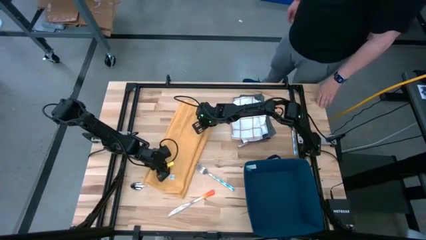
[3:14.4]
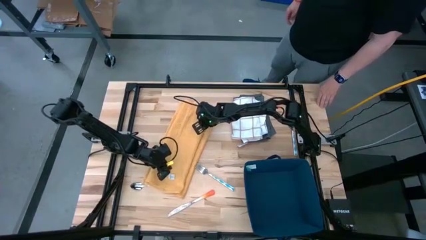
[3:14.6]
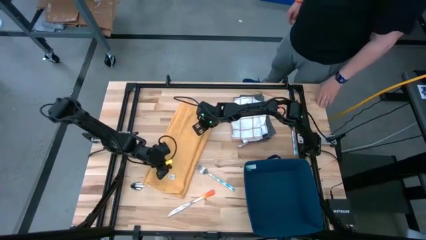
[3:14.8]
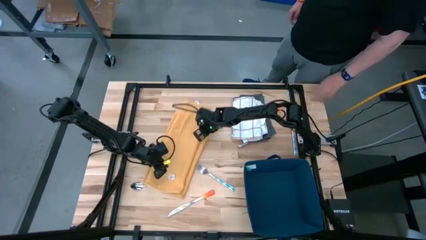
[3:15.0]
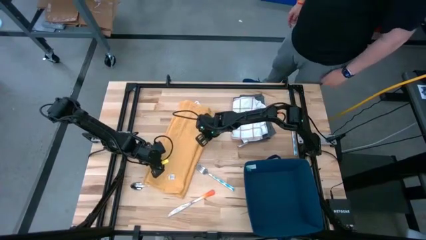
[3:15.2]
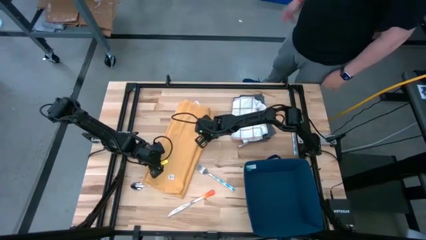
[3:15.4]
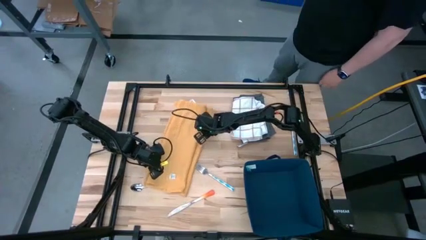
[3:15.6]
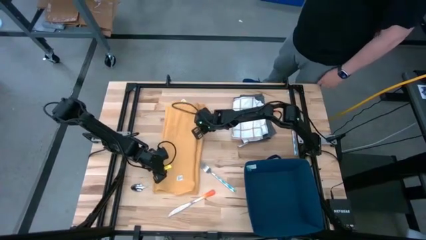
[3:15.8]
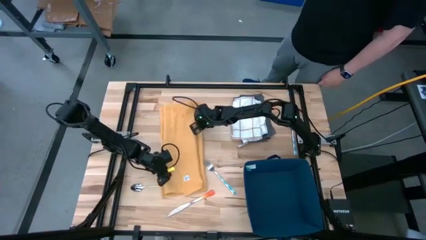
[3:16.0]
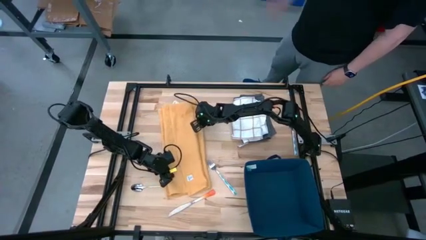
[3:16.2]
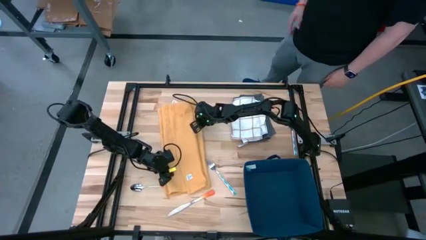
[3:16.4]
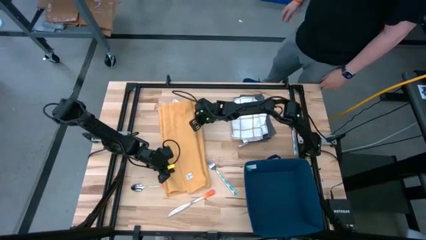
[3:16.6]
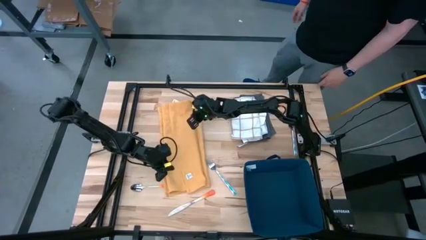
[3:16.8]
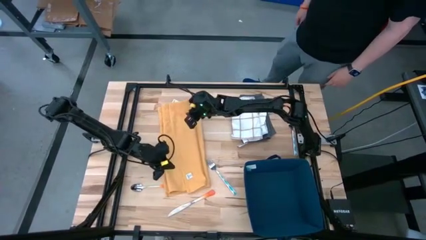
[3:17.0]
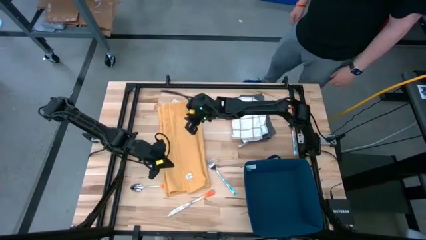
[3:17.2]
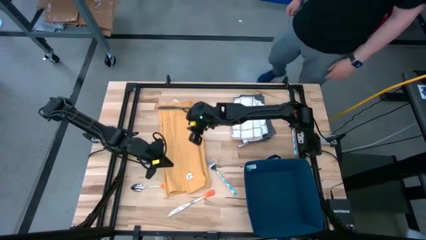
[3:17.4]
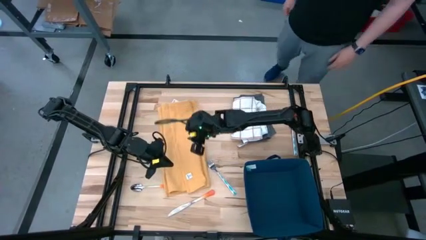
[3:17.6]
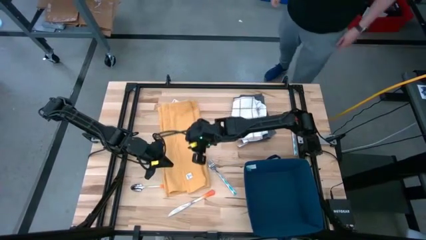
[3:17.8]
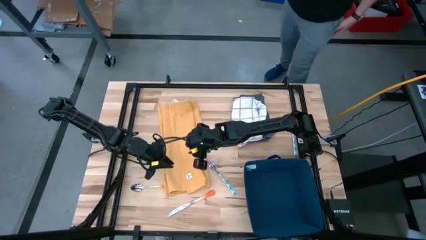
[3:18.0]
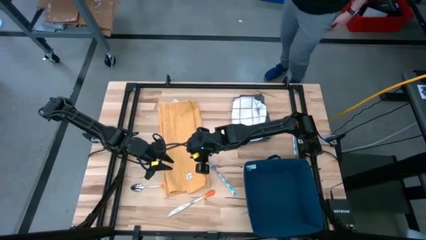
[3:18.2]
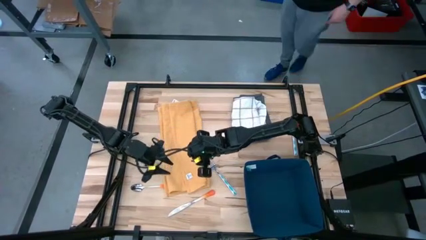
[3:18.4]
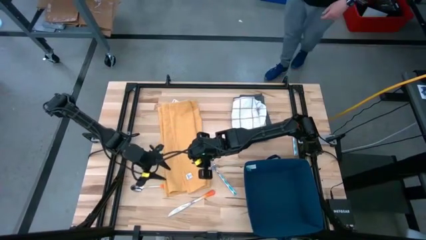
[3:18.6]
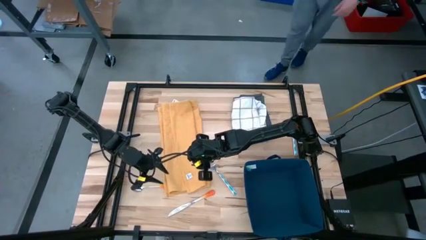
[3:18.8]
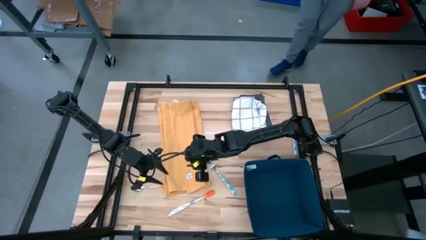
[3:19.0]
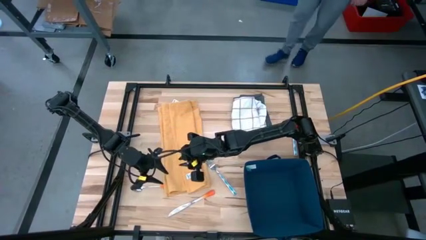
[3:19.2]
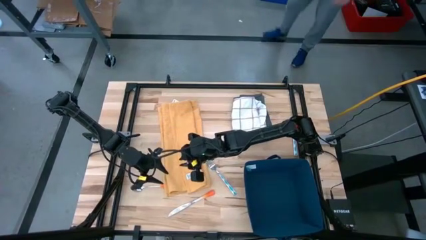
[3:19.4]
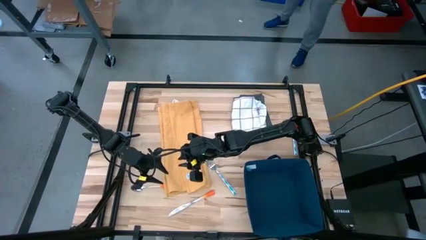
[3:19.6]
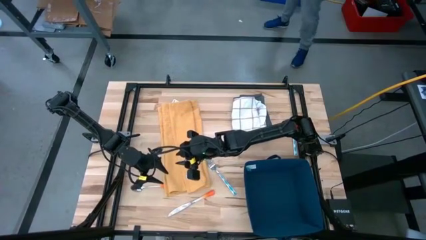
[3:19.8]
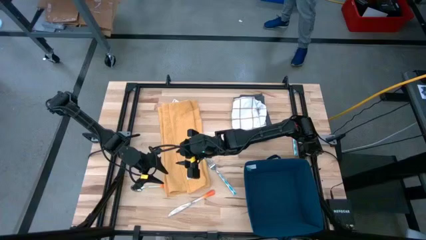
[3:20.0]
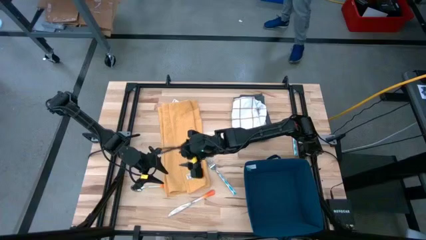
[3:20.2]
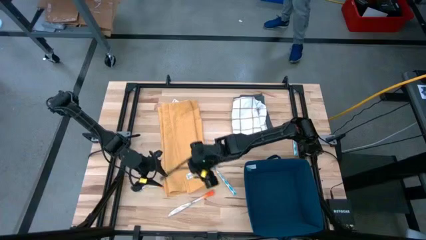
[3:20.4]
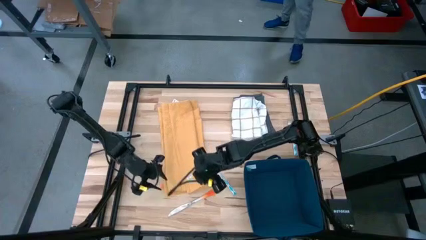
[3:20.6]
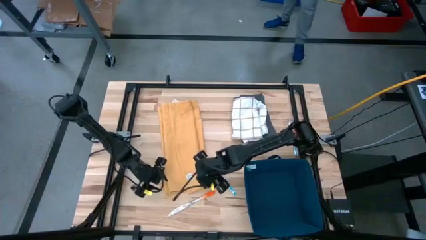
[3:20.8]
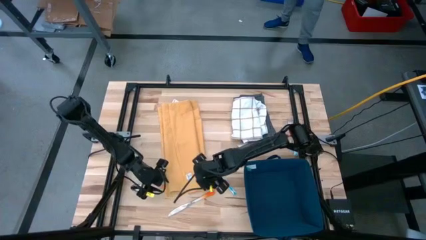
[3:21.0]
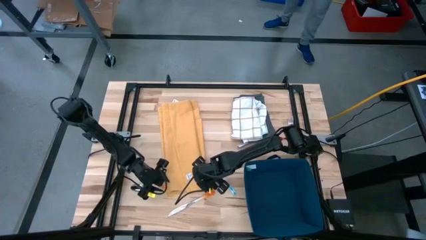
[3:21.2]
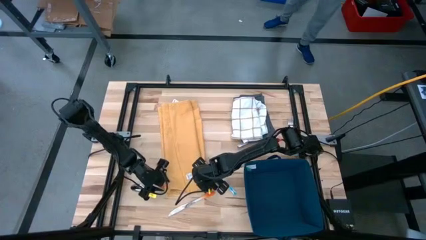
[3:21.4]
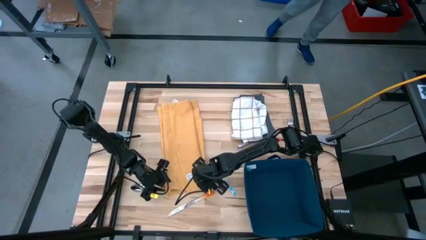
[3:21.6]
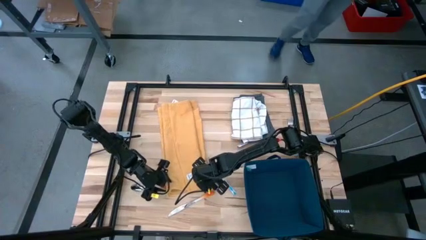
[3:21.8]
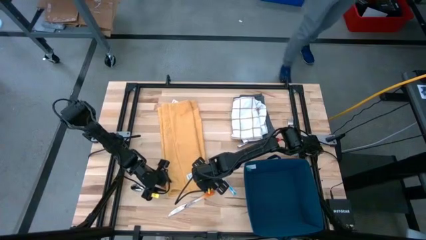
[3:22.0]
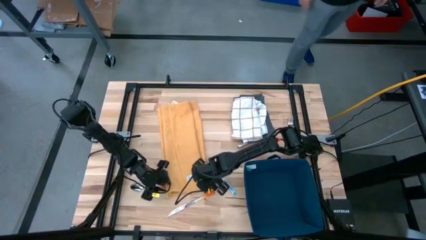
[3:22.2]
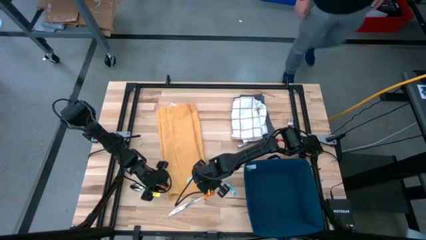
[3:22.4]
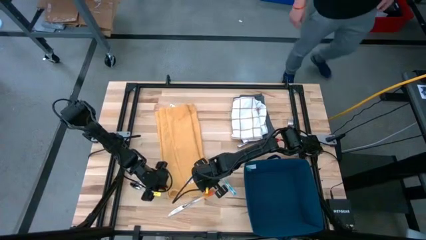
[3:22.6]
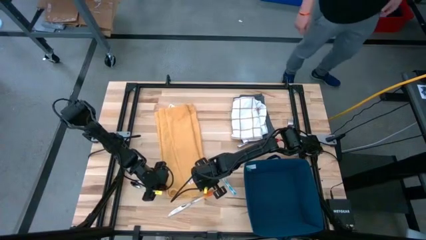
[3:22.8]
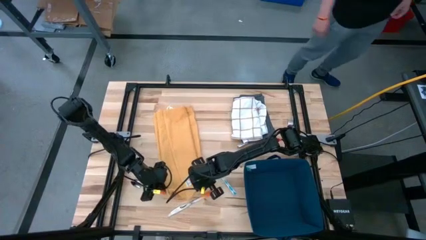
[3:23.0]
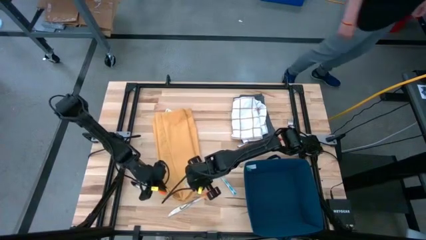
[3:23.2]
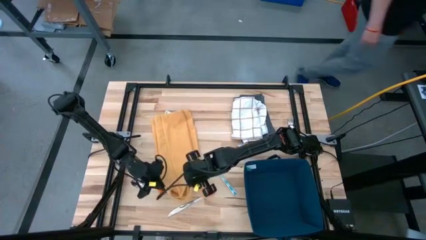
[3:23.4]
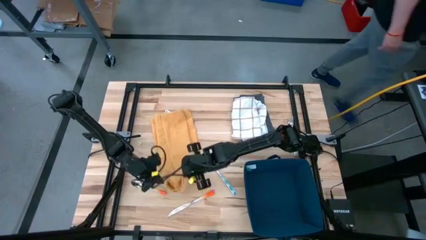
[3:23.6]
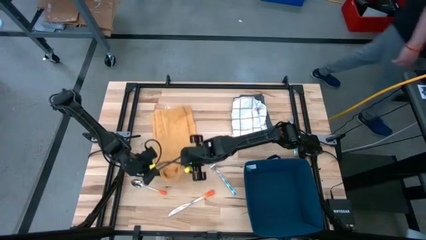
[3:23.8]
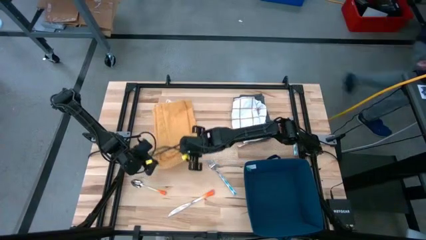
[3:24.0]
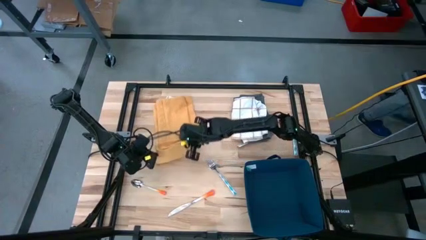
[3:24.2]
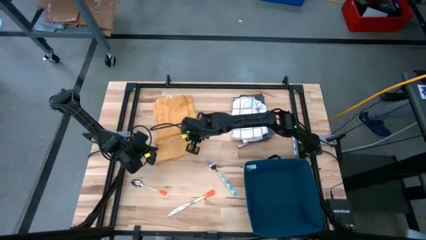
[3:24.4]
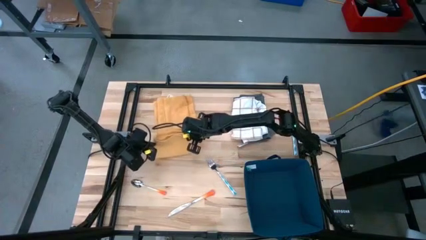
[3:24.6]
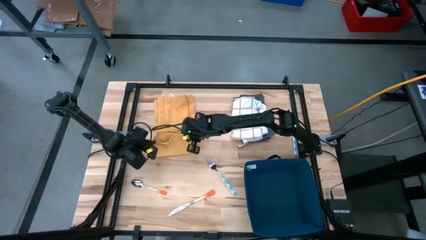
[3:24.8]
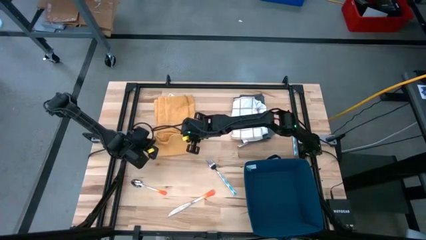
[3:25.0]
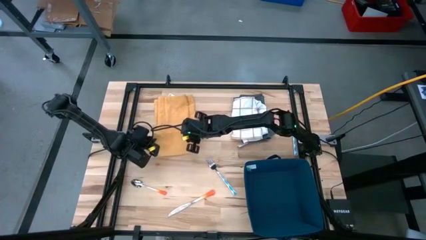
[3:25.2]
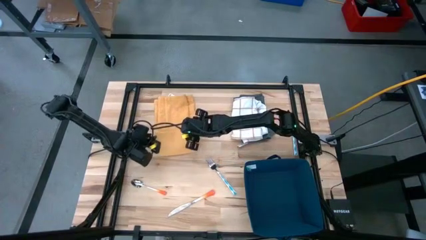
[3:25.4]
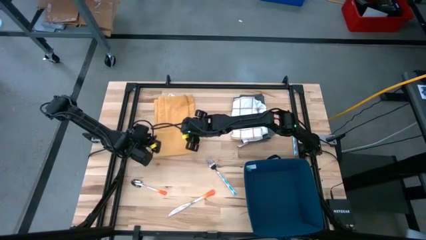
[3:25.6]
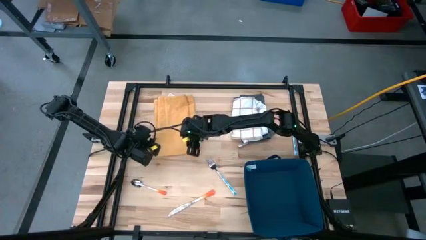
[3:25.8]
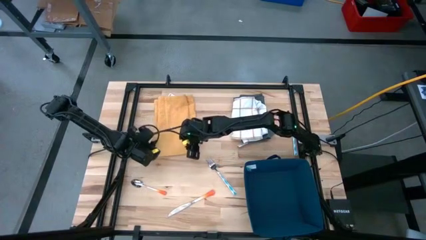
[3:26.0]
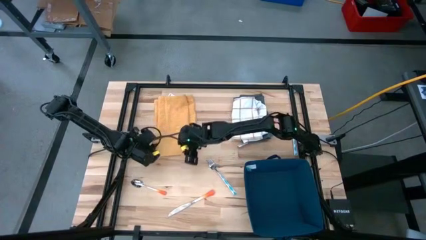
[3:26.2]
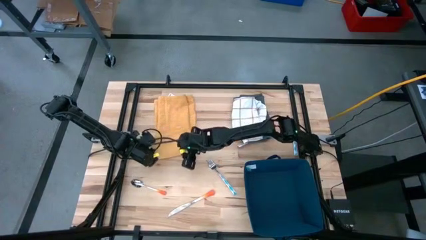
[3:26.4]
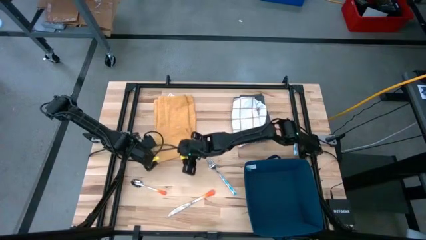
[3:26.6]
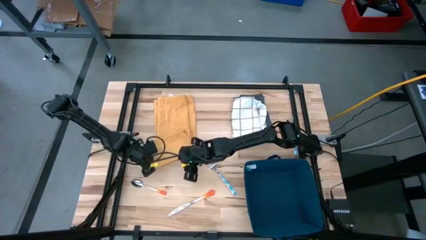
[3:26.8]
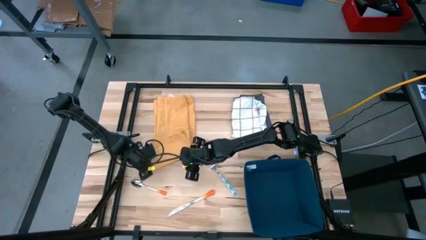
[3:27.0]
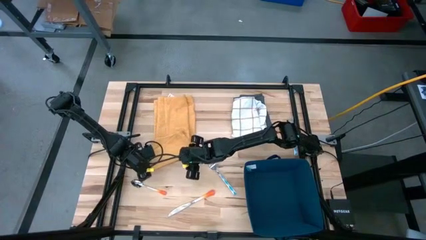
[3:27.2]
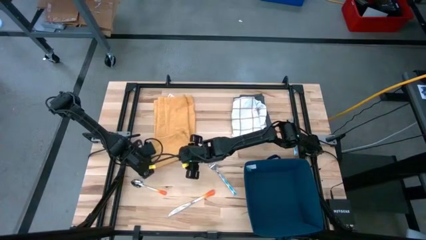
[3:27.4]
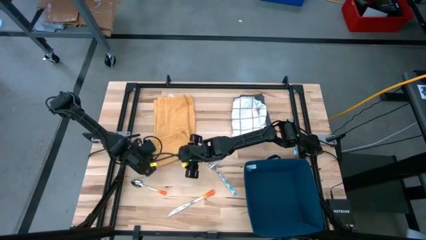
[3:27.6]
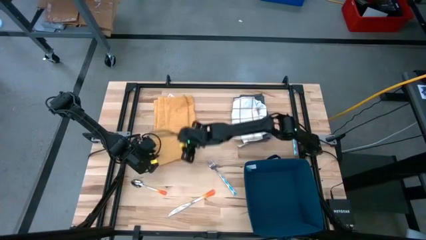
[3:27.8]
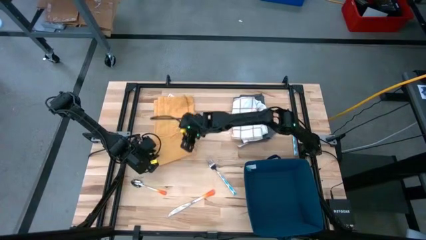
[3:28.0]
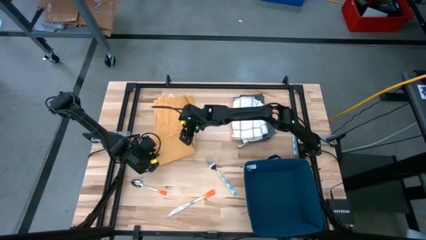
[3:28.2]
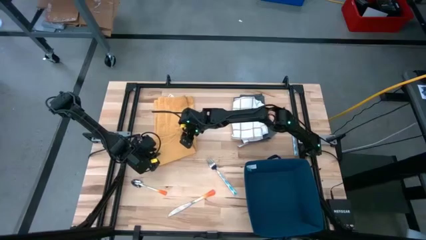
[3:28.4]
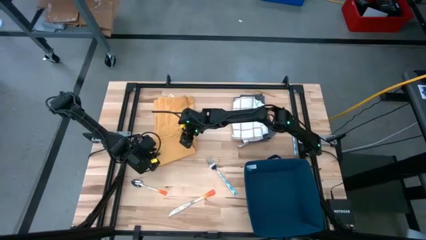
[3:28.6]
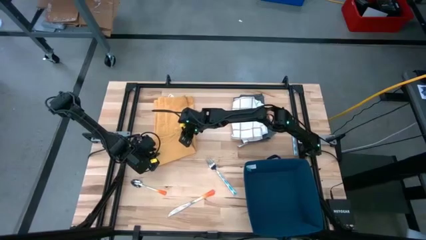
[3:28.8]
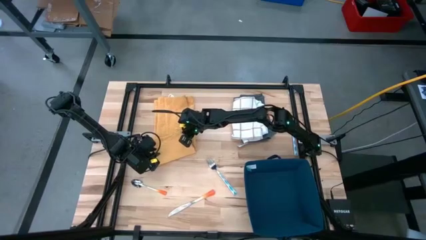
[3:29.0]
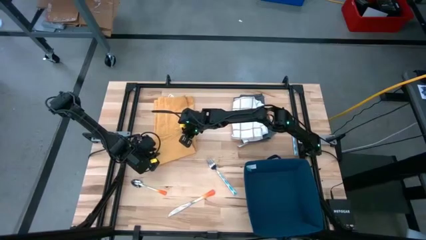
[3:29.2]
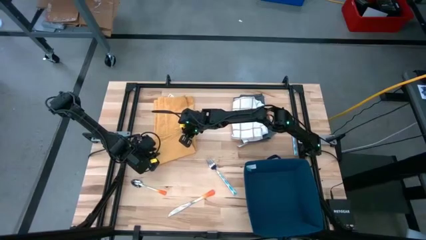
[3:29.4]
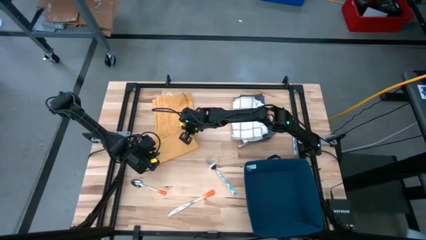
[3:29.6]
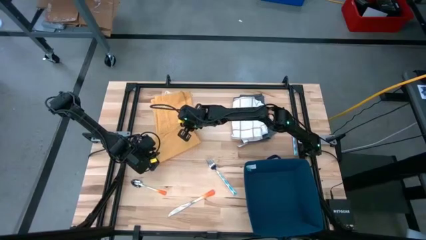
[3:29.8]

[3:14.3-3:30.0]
Task: Fold towel
Fold the orange towel
